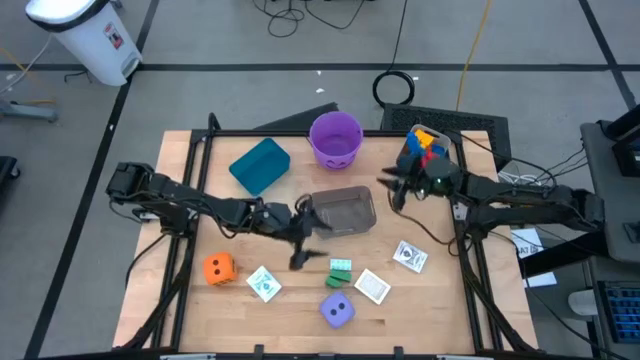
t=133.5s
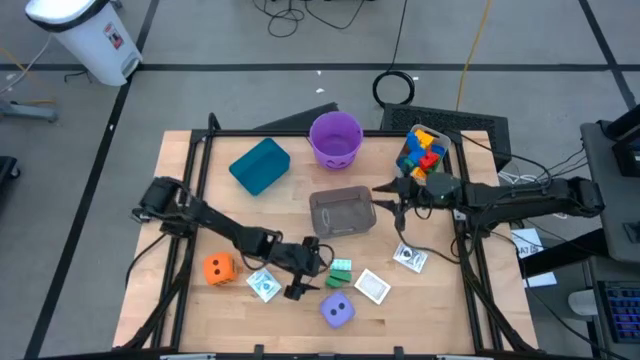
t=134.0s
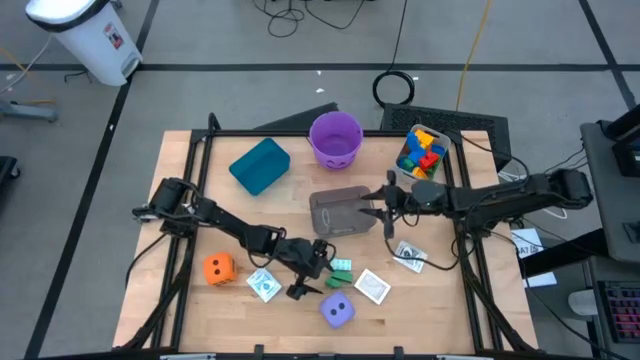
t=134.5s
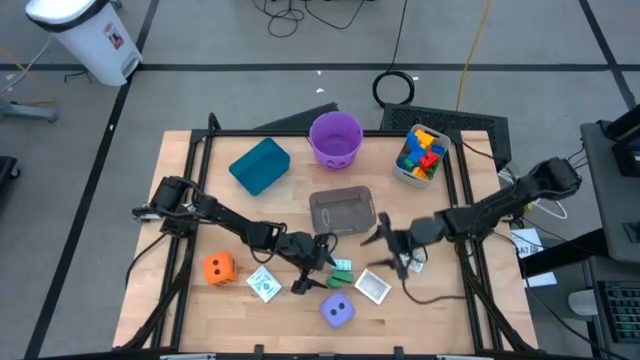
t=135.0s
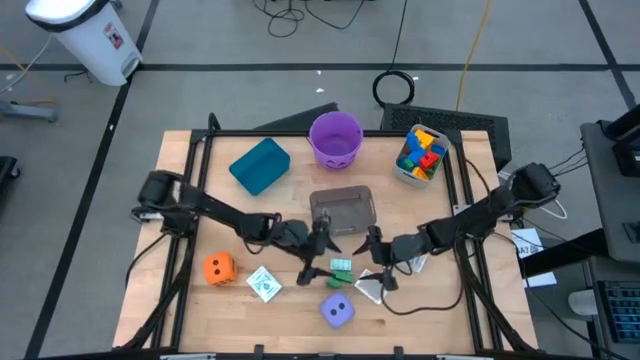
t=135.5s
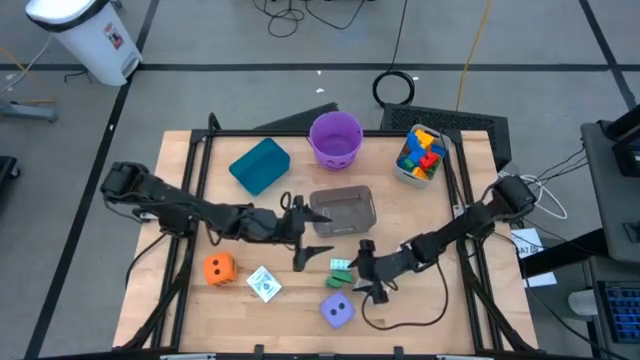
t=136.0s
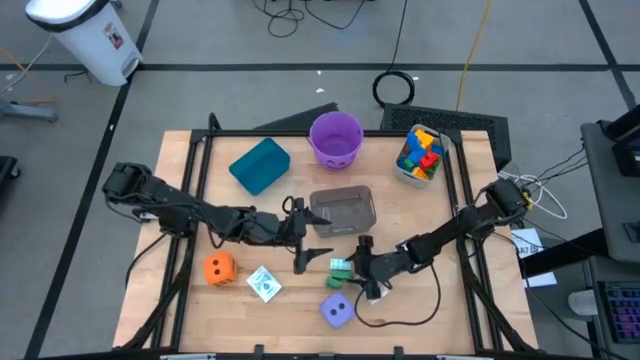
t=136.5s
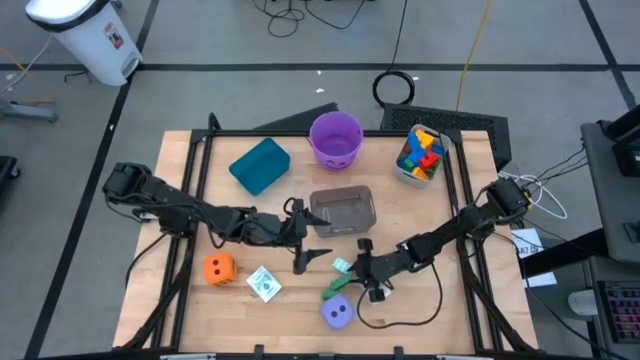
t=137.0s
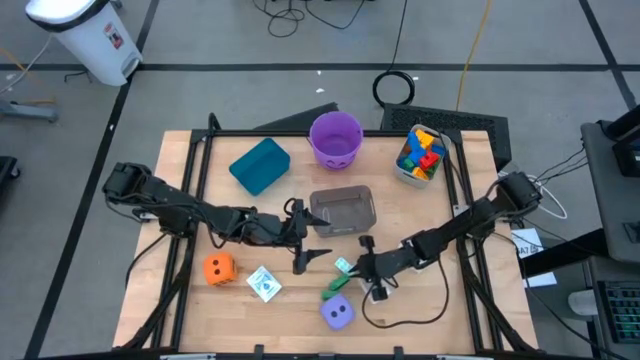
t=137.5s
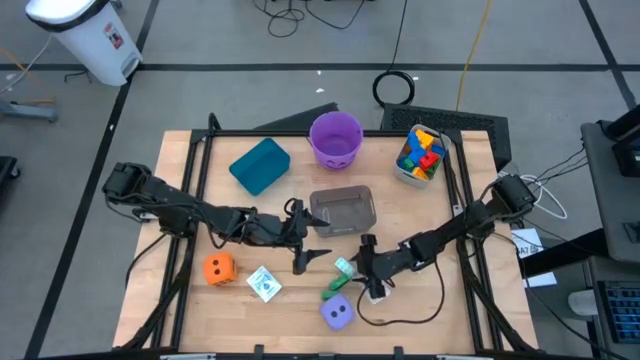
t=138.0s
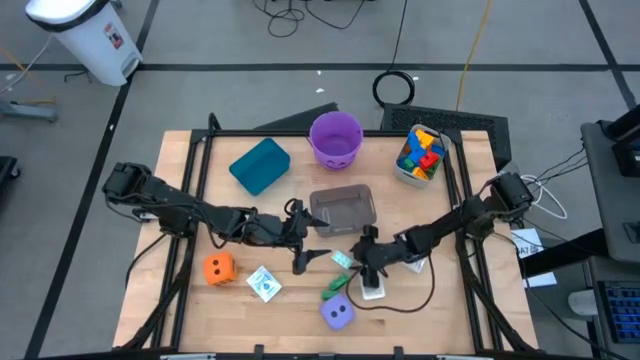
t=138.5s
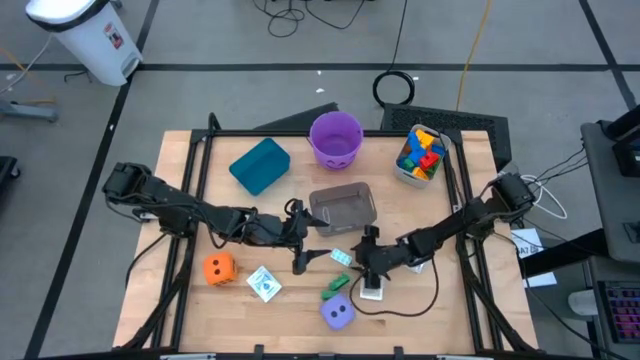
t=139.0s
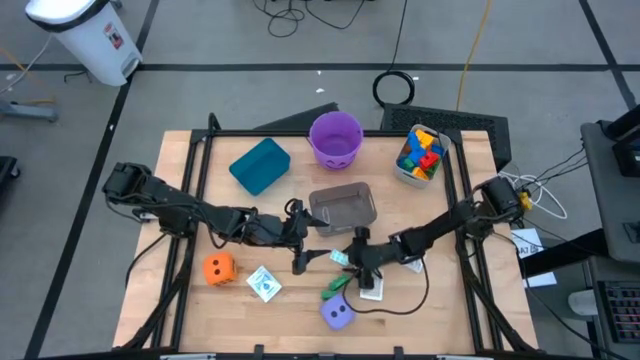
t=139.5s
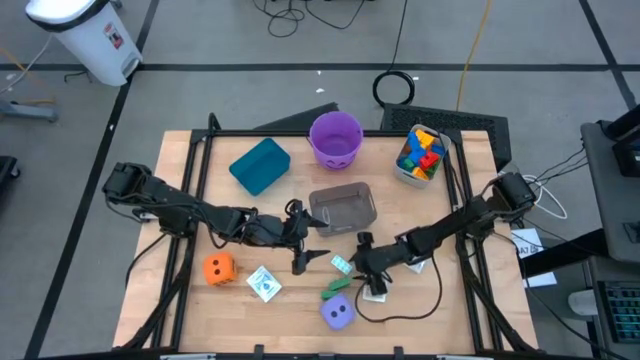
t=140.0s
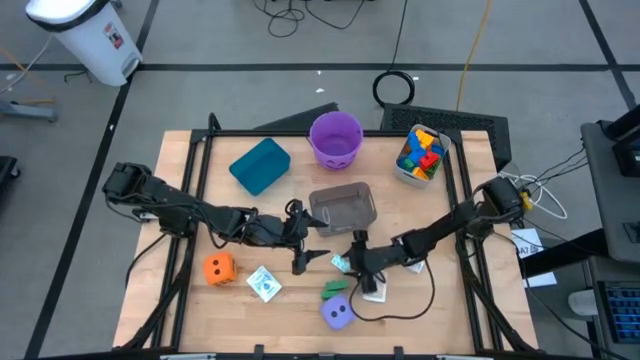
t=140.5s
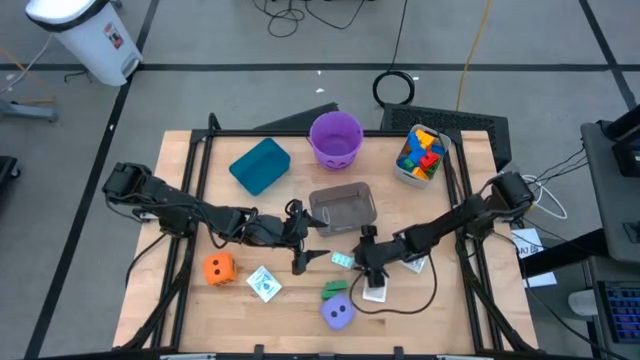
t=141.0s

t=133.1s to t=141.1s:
Task: Pick & Place Toys
Put the light blue game piece into the white bin

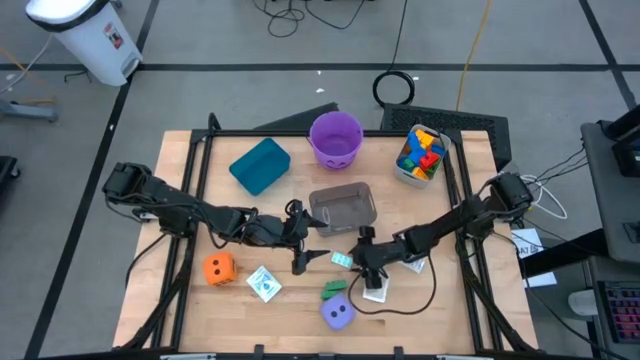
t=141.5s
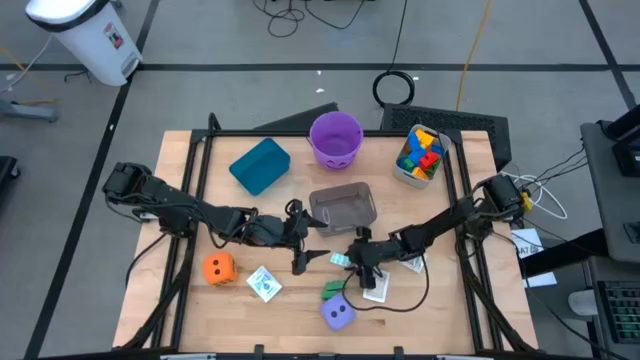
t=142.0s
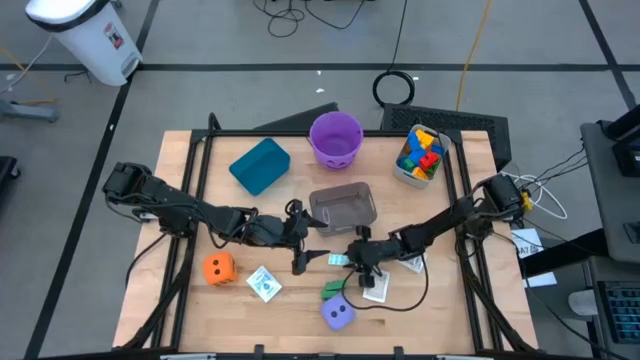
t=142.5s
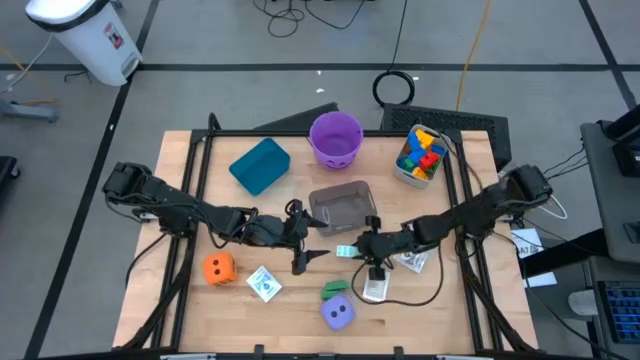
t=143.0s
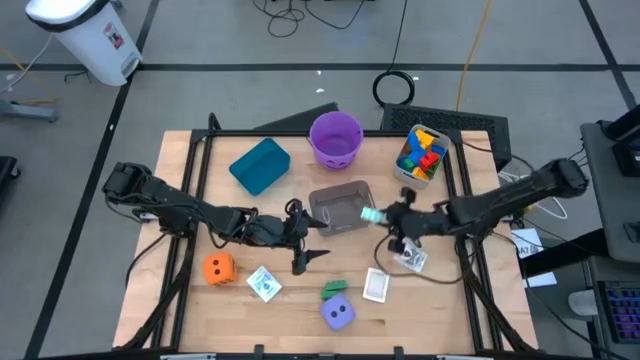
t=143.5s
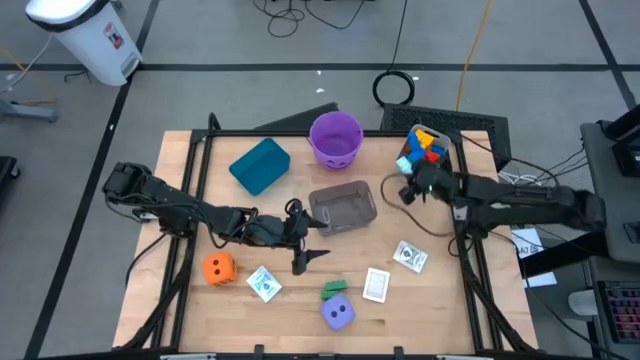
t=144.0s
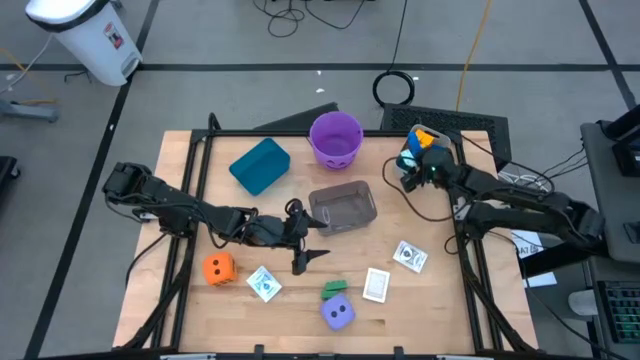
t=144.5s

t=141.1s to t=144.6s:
Put the light blue game piece into the white bin

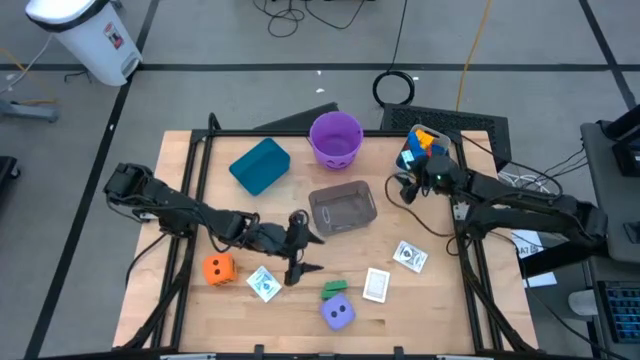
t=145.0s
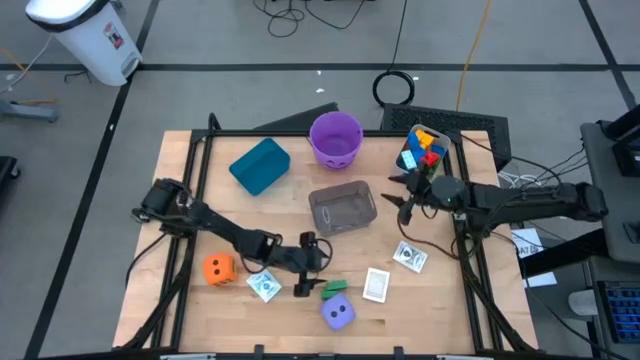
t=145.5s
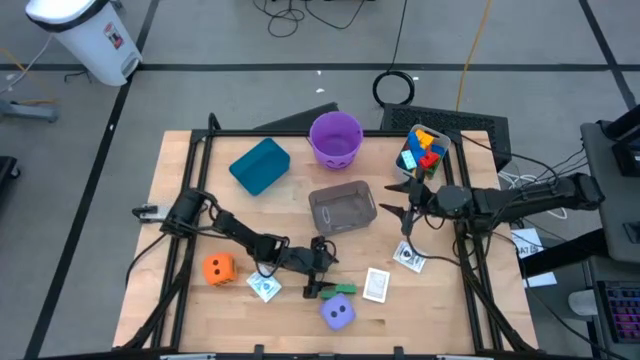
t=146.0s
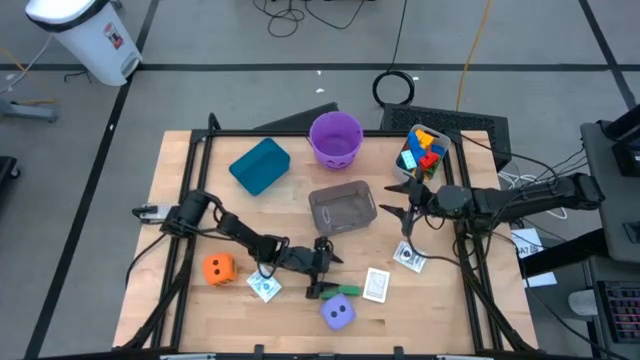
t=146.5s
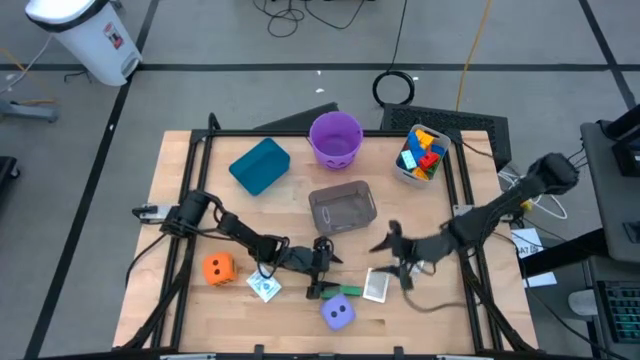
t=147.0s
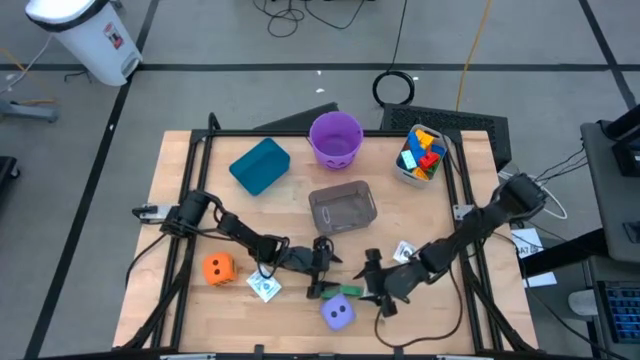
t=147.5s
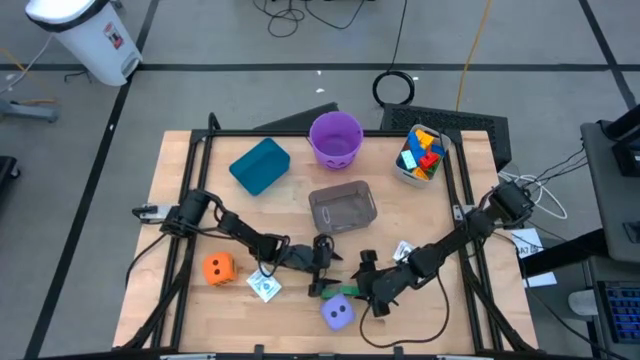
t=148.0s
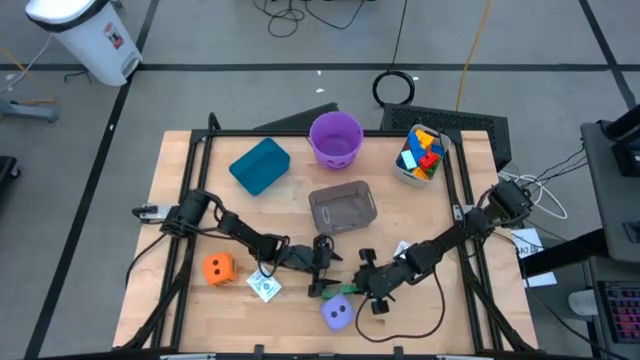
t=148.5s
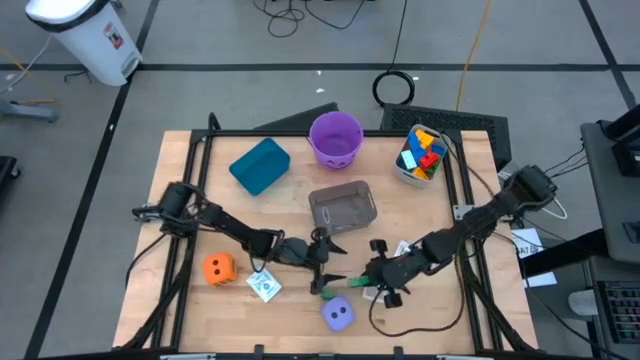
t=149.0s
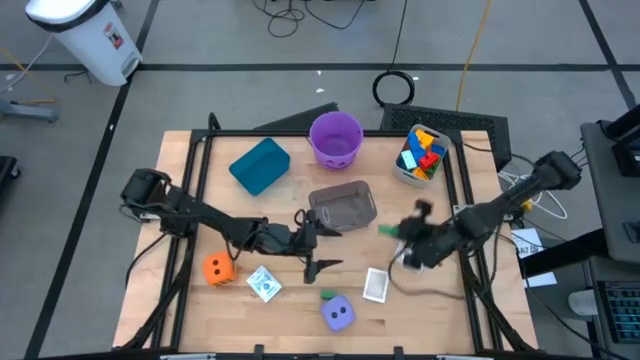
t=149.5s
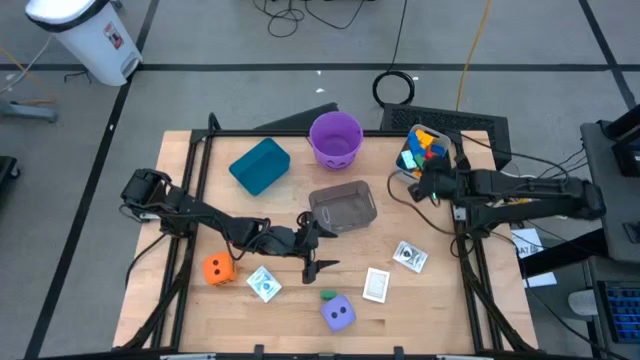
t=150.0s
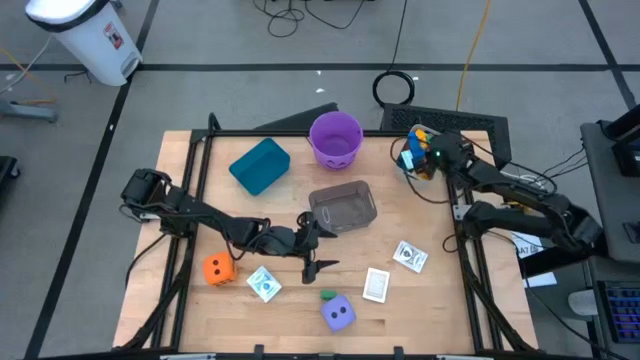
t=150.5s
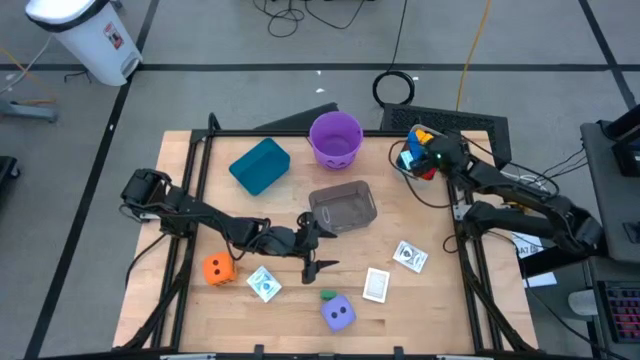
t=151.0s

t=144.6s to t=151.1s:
Put the green game piece into the white bin

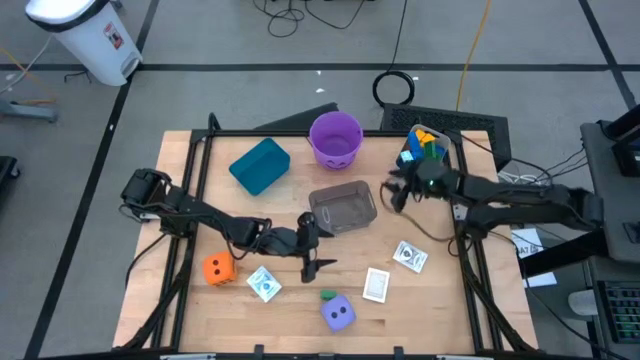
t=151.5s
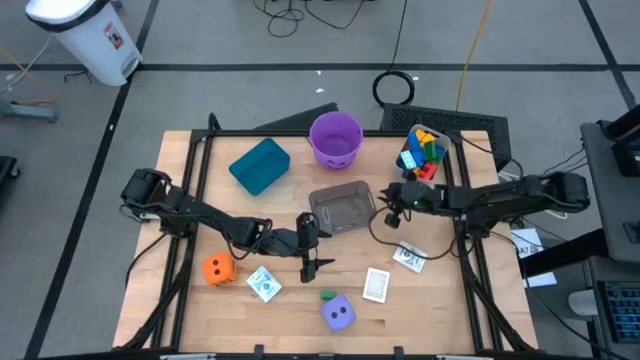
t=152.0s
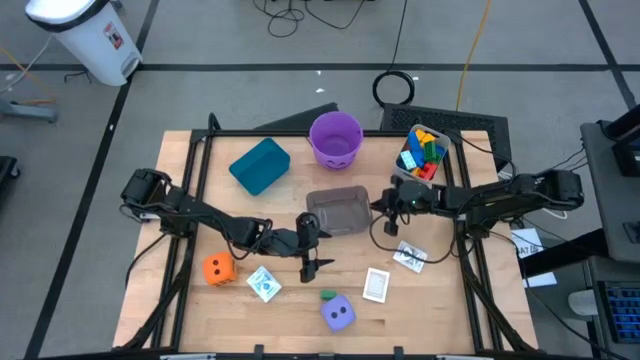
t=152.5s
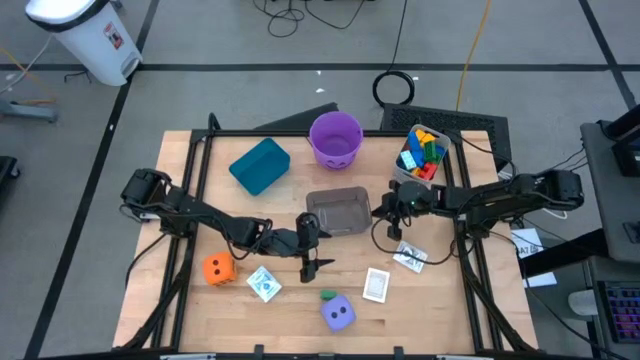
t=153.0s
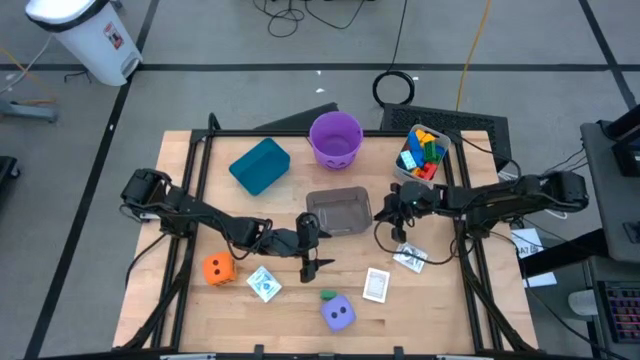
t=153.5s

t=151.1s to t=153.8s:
Adjust the black transparent bin

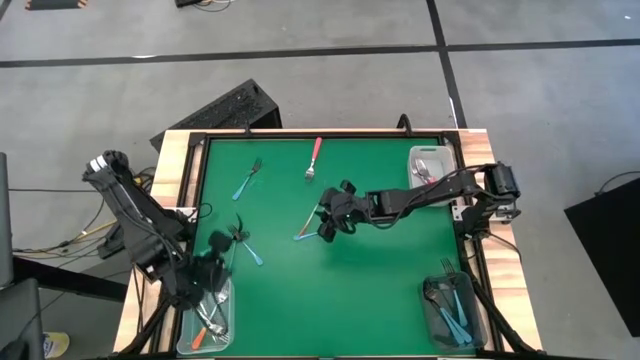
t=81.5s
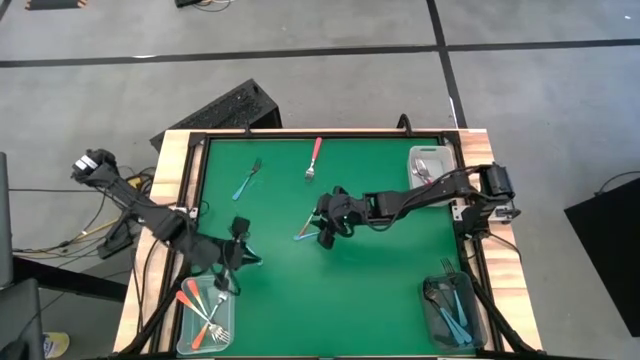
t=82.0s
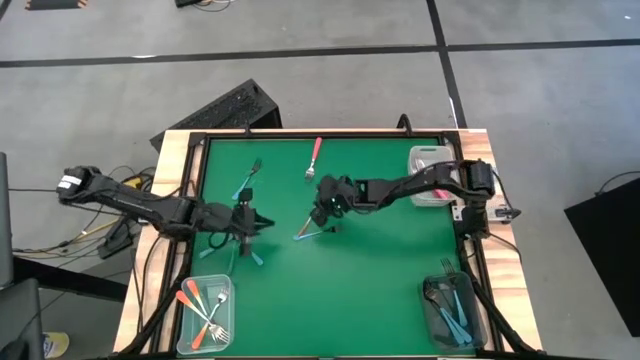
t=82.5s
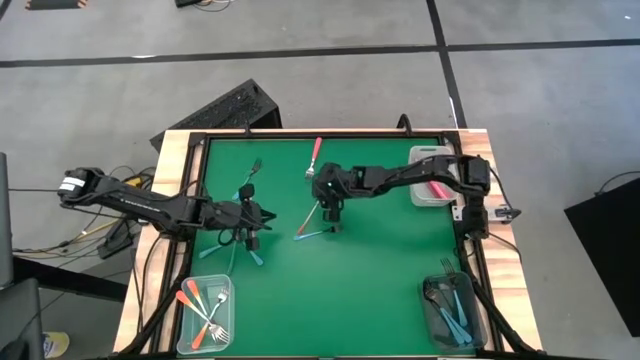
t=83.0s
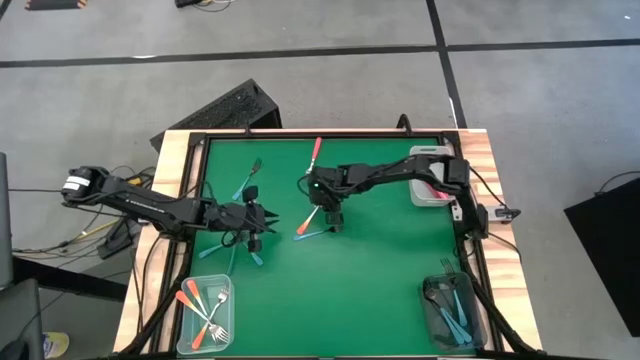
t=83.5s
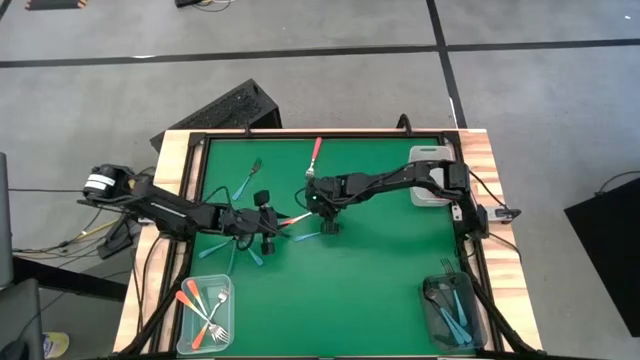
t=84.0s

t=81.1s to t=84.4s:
Task: Sort silverware by color (type)
Put the orange fork into the transparent bin
